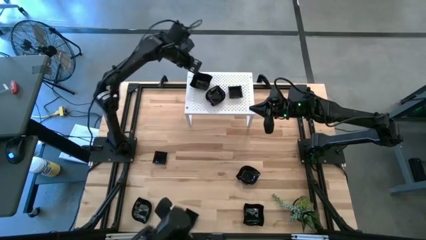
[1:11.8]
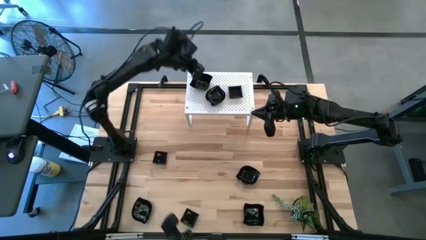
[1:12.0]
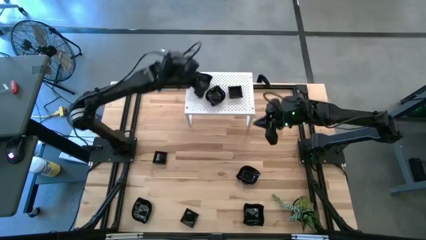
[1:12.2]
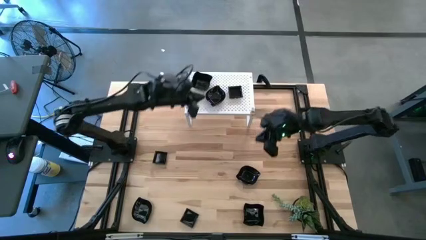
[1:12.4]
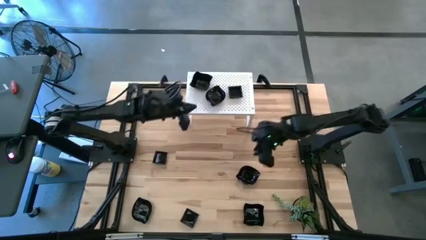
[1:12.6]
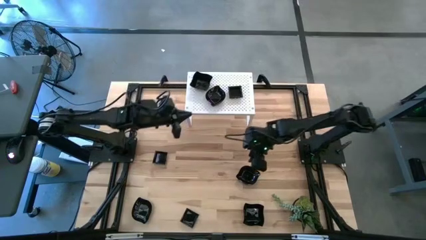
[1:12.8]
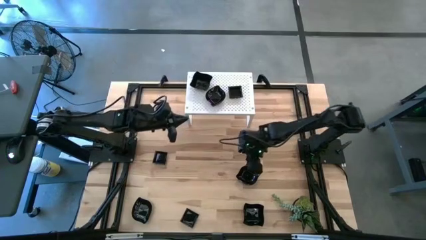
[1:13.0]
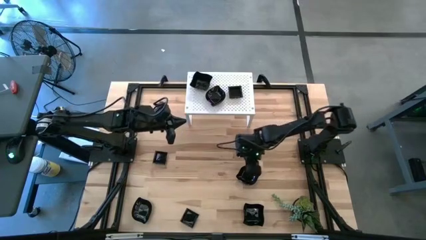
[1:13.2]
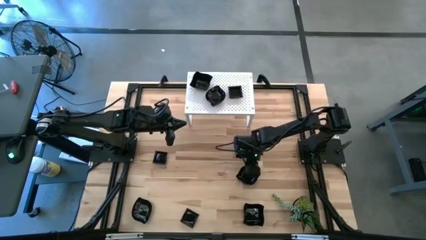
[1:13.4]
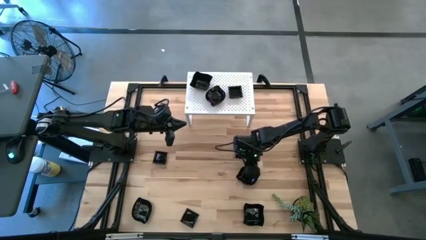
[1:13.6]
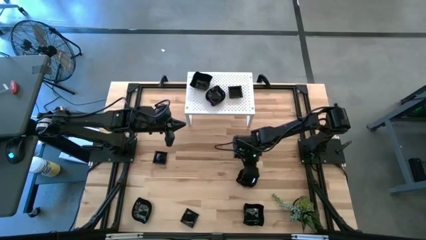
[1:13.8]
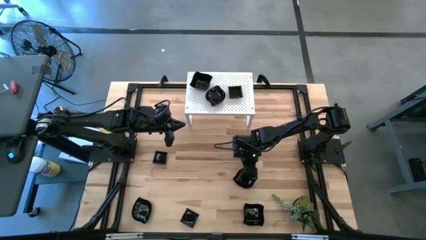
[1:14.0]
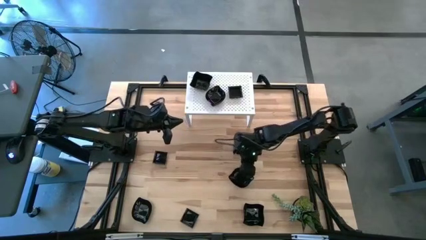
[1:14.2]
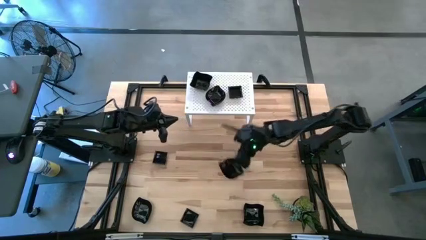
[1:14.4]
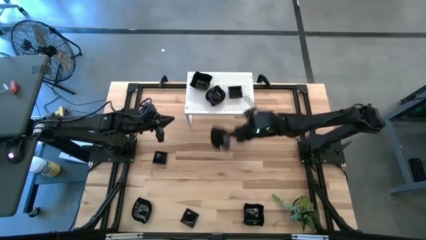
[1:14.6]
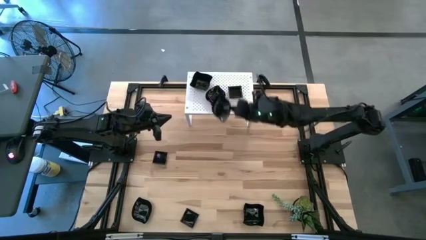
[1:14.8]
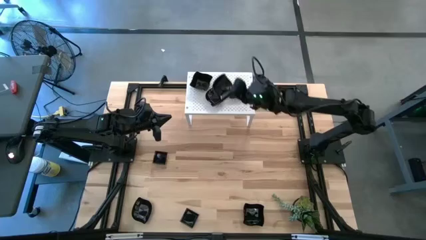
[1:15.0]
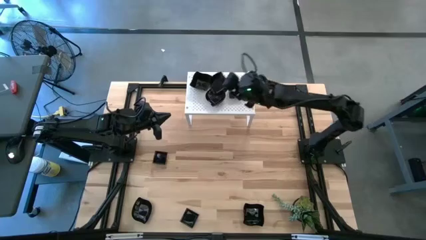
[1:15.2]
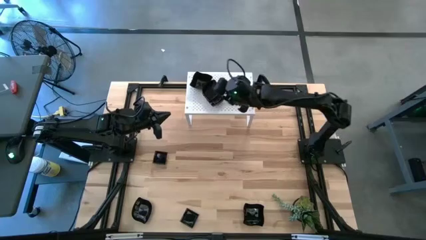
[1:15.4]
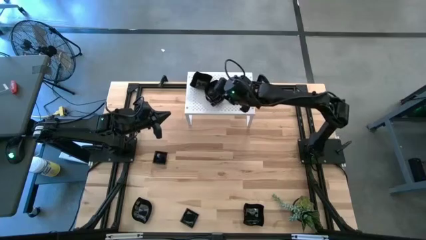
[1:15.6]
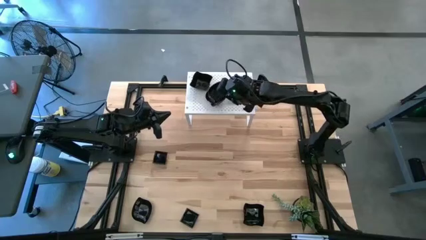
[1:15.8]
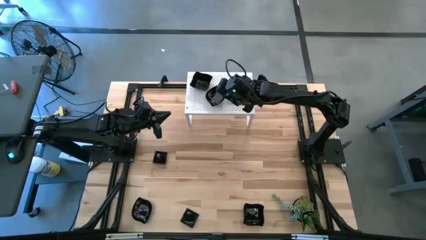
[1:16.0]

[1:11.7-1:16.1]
Task: Pick & Place Mini shaped plates
Stack the black leaf shaped plate on top of the black leaf shaped plate on the shelf

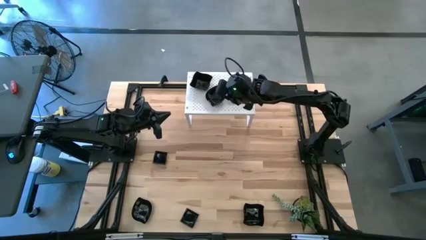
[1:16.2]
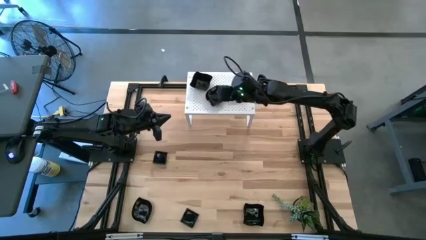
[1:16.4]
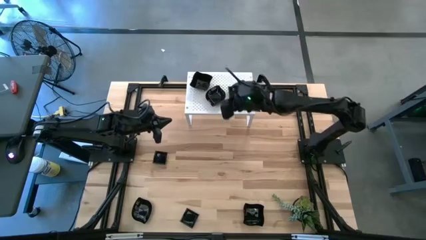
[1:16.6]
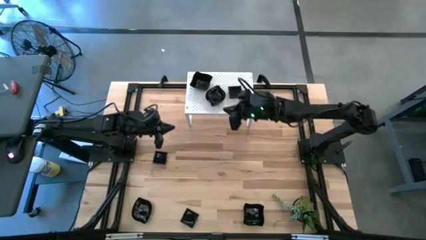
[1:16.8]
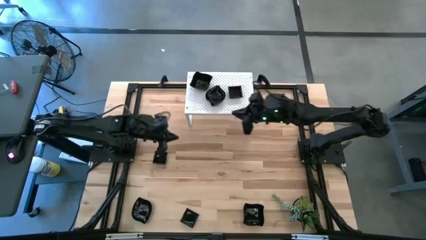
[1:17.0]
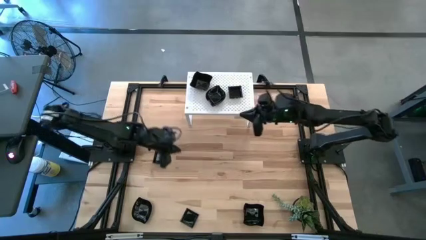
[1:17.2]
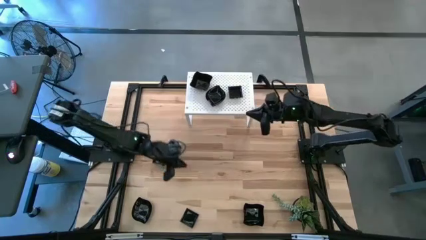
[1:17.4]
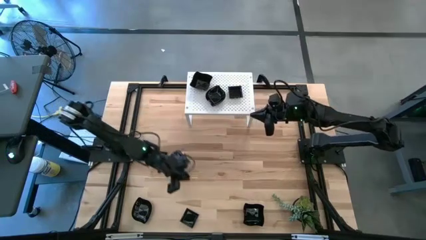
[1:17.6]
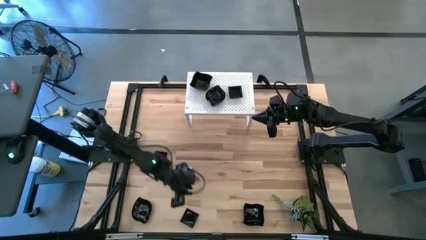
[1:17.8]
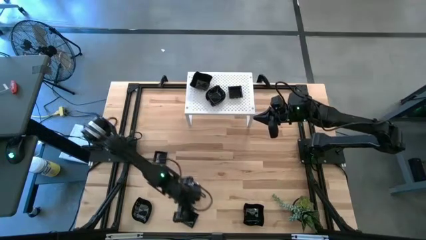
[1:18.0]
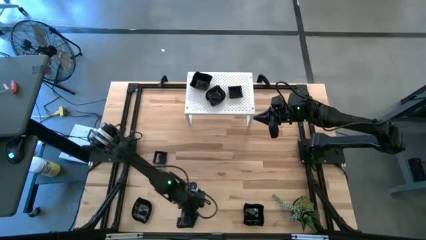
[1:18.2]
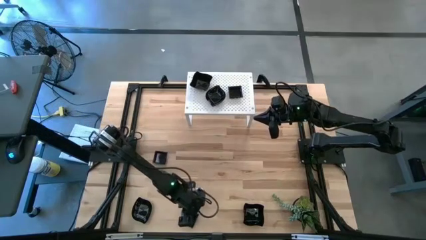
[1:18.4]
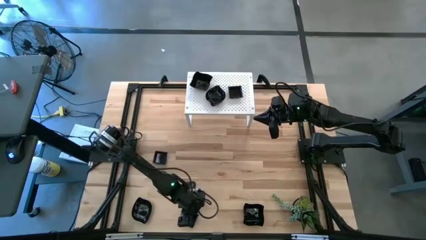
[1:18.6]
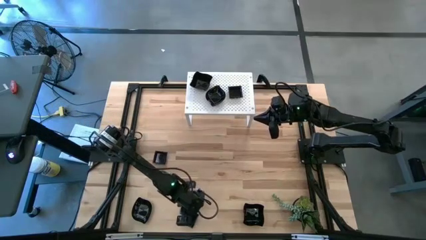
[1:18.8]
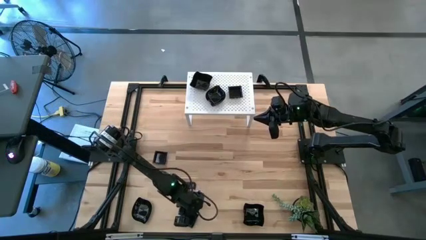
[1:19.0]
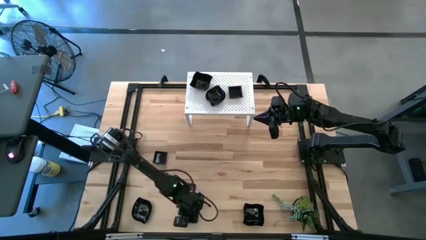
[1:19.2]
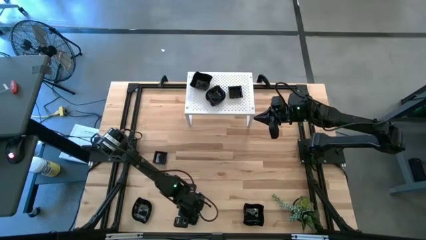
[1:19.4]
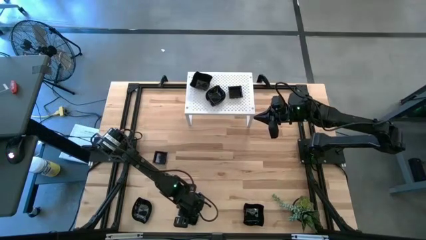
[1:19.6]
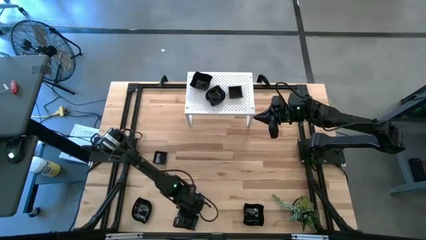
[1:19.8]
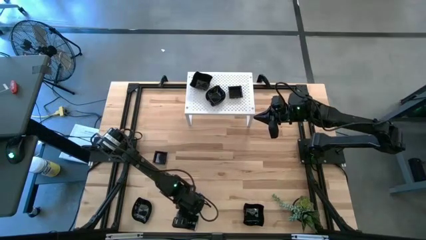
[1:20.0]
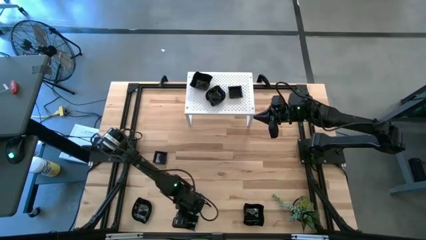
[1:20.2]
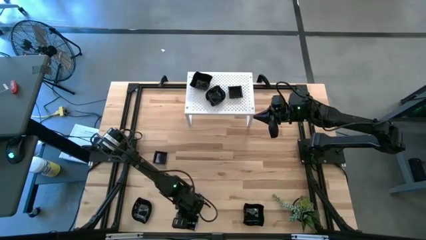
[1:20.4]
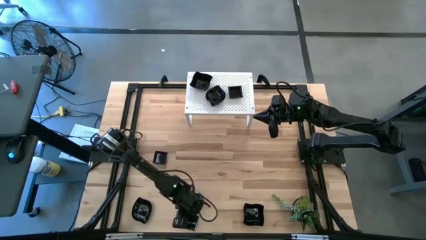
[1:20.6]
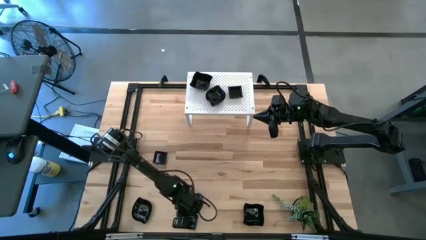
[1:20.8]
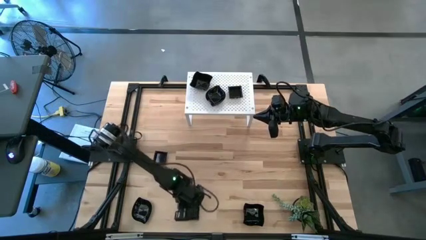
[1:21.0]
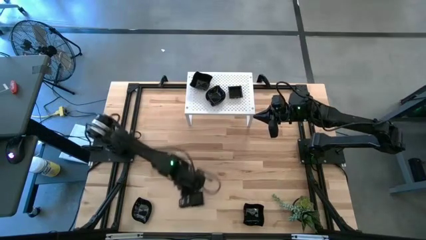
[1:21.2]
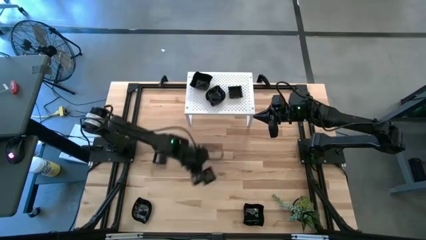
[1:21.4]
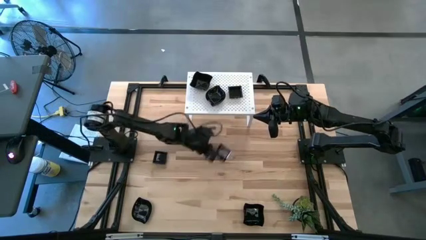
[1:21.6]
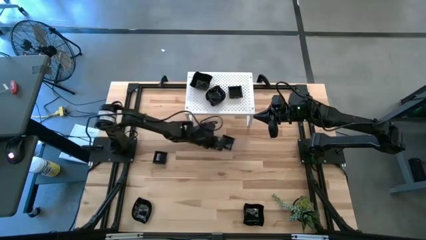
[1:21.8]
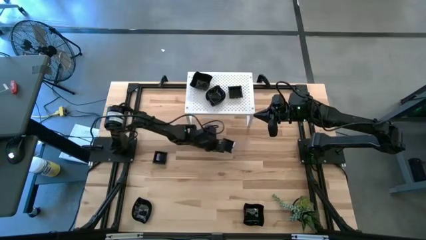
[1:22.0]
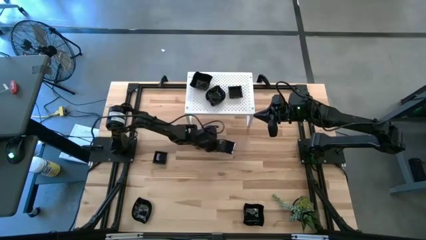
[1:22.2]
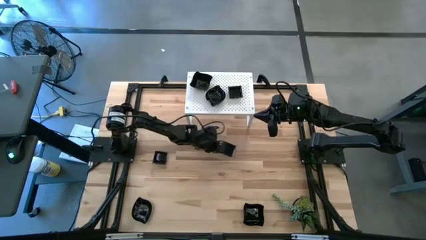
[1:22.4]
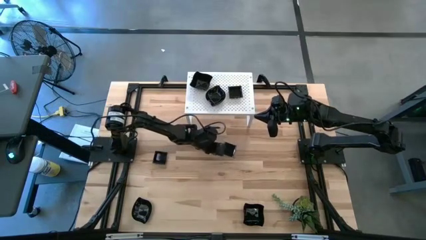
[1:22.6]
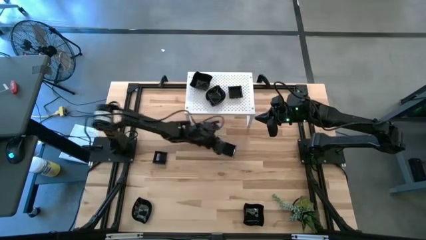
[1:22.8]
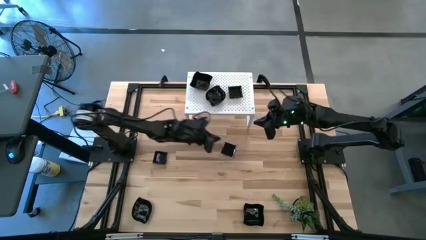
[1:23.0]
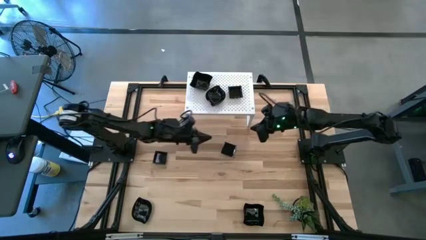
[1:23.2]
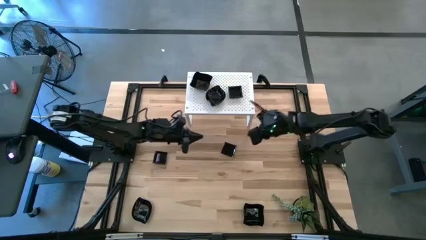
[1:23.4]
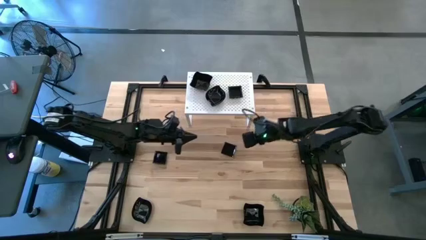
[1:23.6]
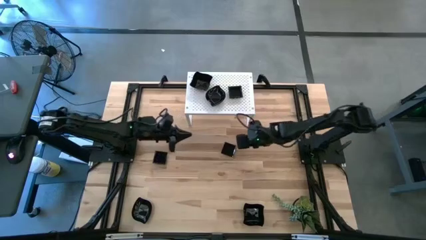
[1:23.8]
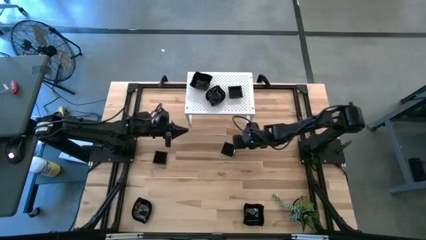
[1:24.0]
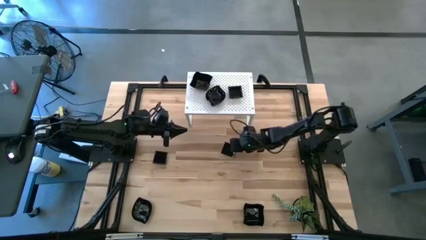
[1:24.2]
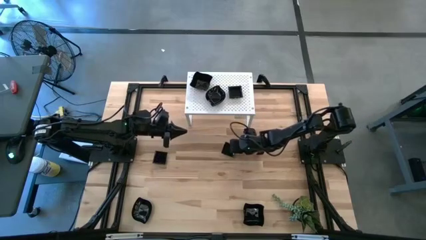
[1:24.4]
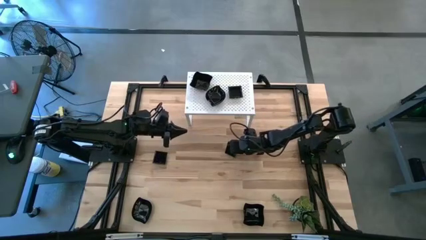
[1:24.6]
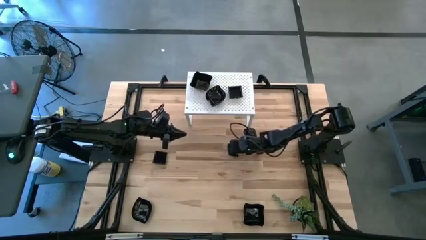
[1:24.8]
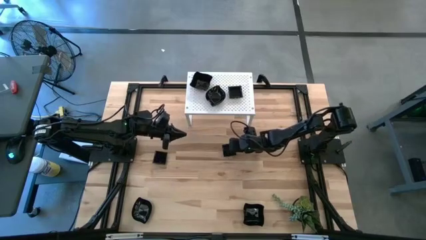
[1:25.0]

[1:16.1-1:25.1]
Stack the black square plate on top of the black square plates on the shelf

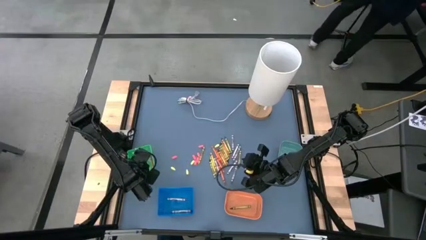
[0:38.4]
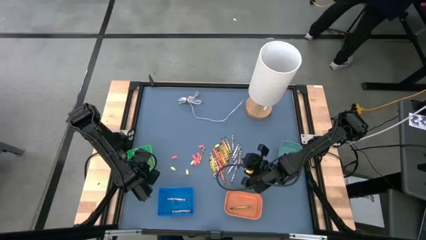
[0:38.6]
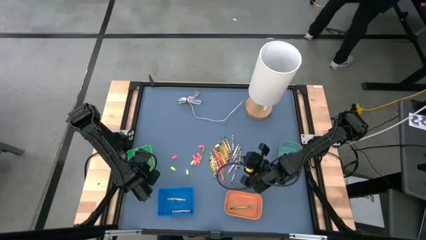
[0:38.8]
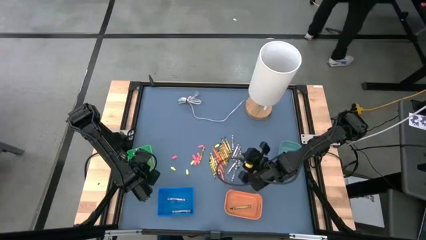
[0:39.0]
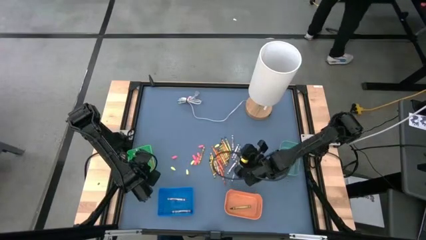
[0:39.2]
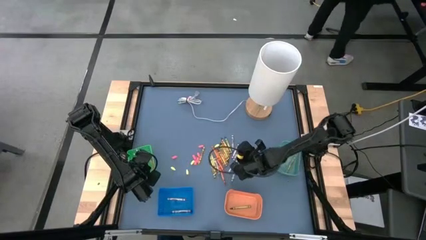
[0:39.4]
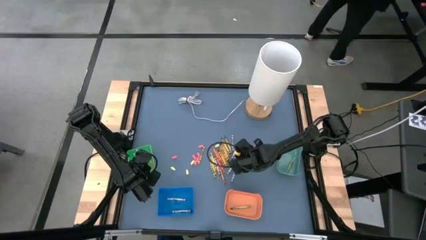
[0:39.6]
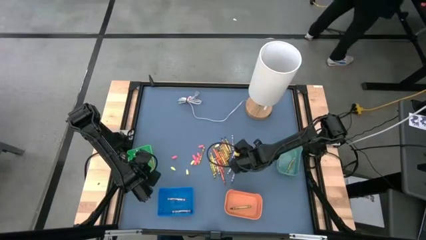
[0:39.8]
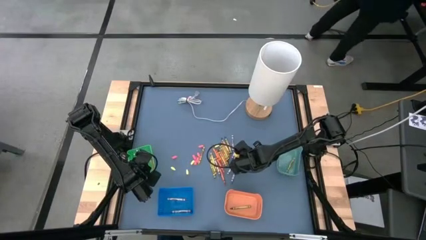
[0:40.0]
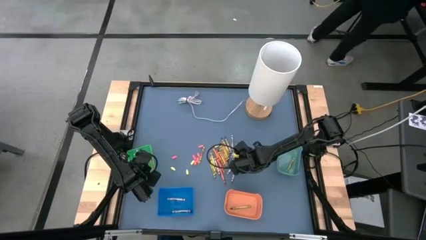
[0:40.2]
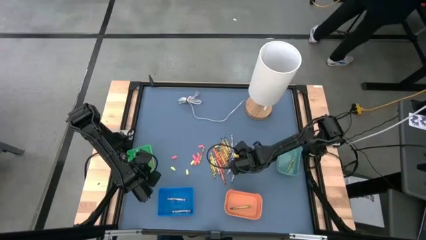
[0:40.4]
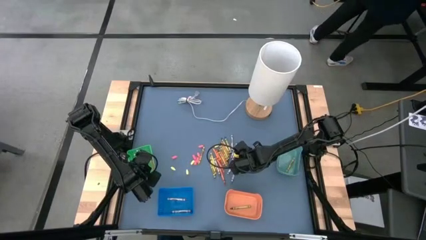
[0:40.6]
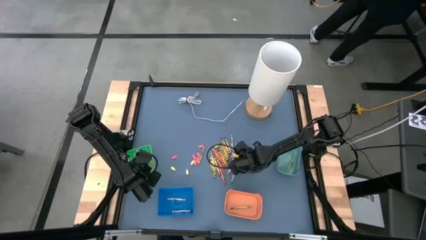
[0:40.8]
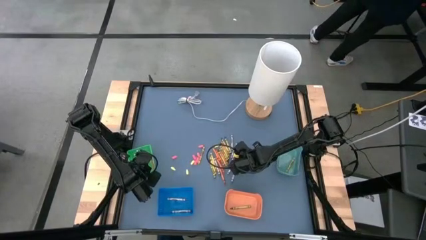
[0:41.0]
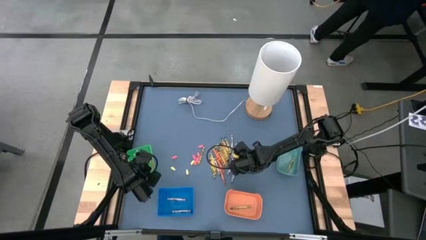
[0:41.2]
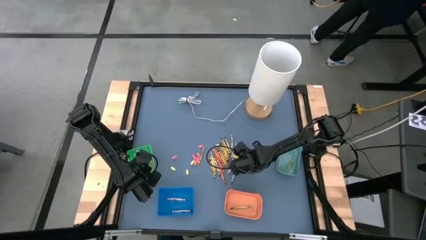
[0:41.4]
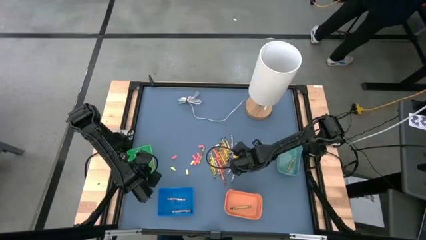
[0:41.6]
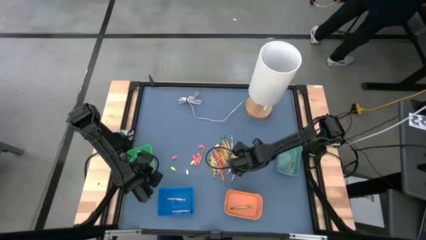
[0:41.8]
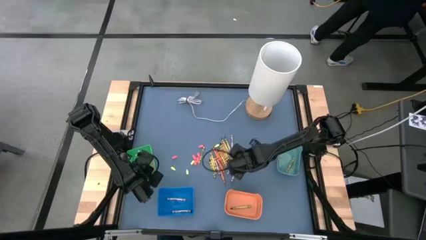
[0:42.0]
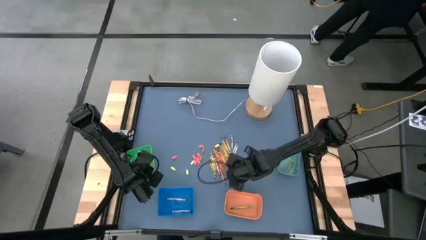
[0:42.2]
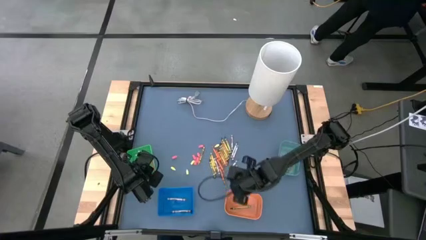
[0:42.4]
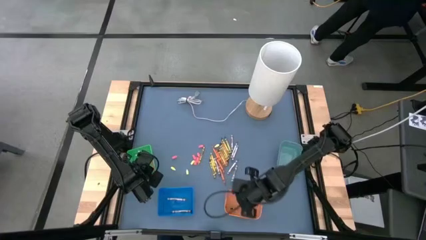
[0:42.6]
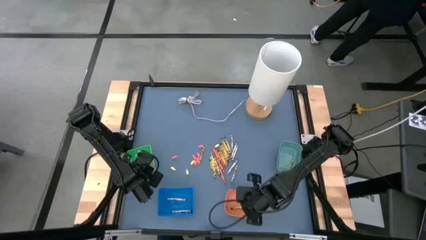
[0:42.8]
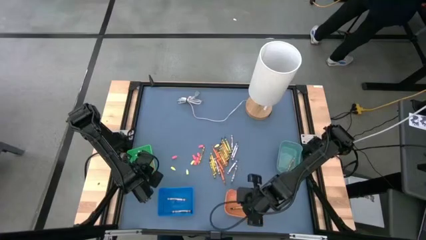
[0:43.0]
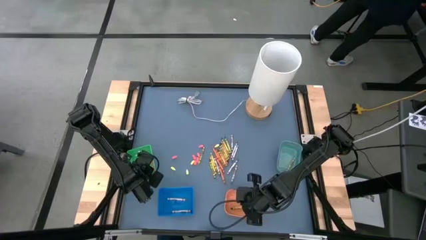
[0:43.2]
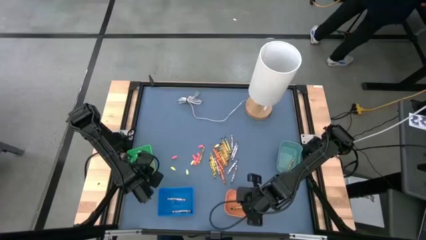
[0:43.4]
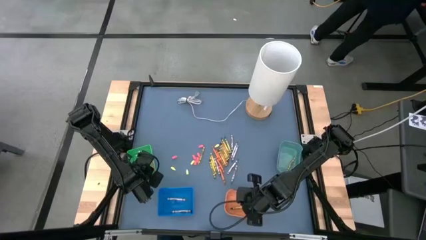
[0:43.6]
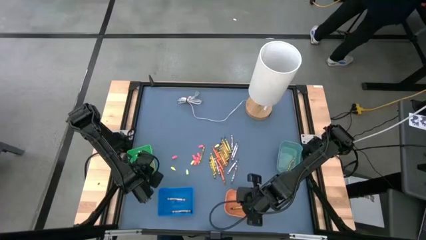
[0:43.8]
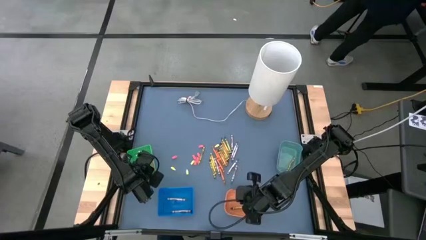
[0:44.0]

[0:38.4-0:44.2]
Task: Sort crayons
Put the green crayon into the orange bin
